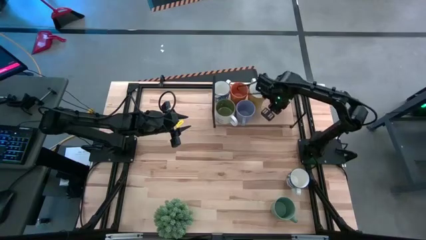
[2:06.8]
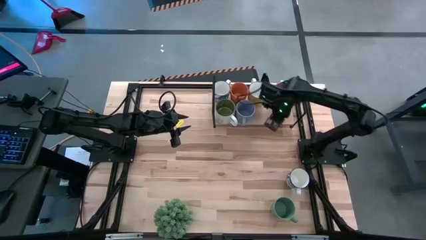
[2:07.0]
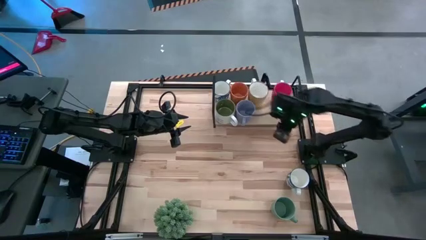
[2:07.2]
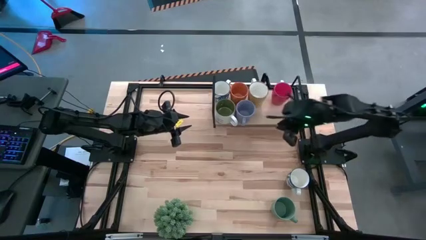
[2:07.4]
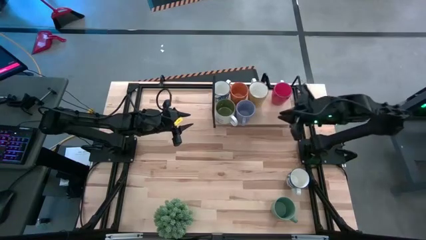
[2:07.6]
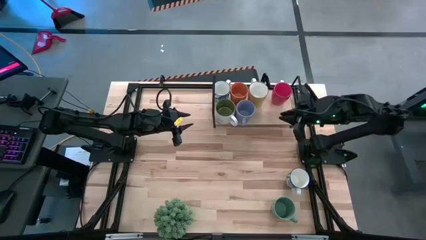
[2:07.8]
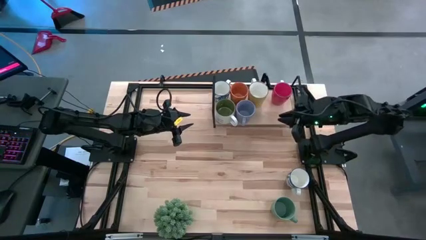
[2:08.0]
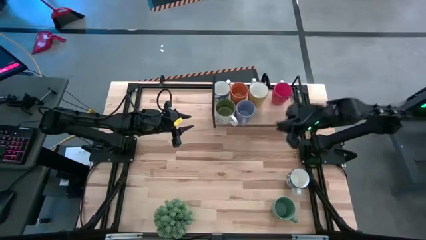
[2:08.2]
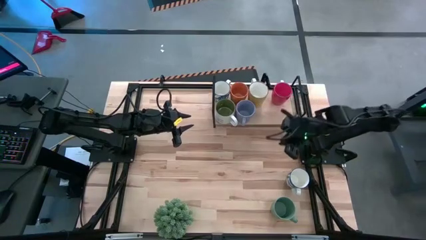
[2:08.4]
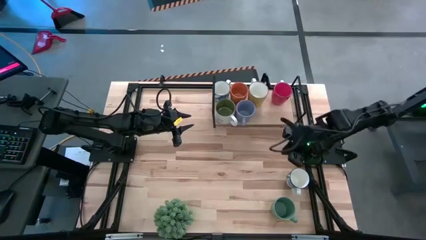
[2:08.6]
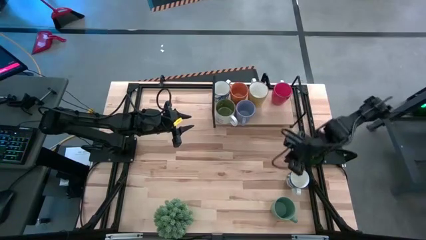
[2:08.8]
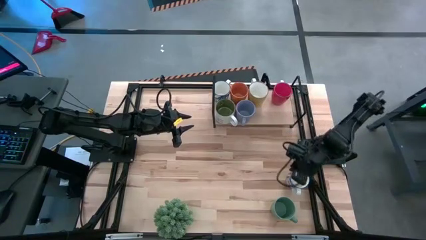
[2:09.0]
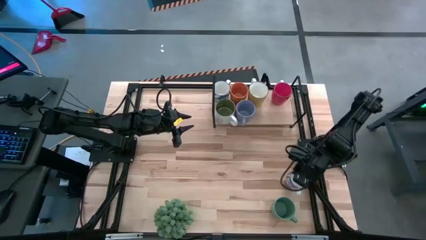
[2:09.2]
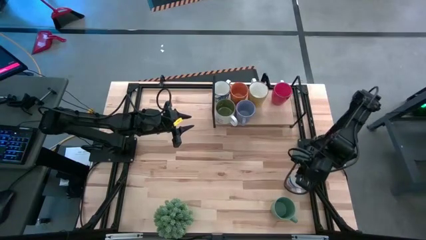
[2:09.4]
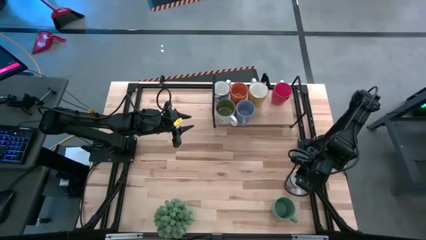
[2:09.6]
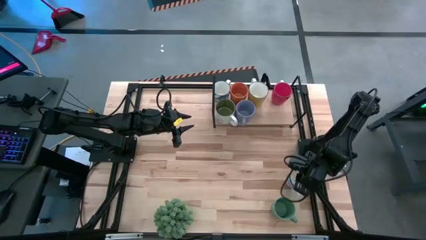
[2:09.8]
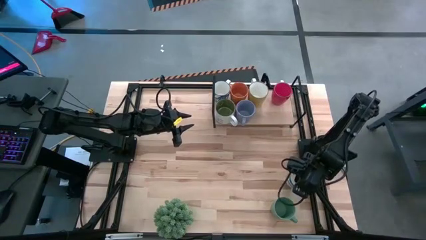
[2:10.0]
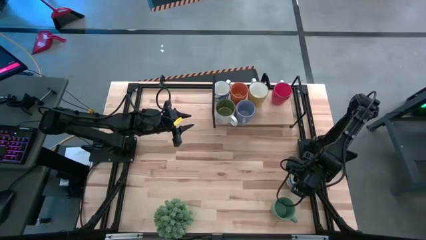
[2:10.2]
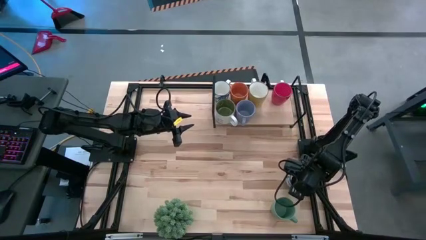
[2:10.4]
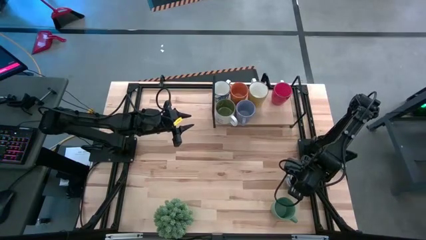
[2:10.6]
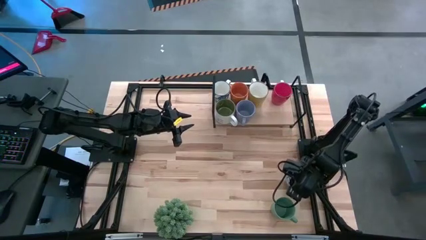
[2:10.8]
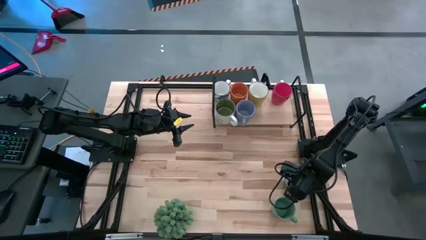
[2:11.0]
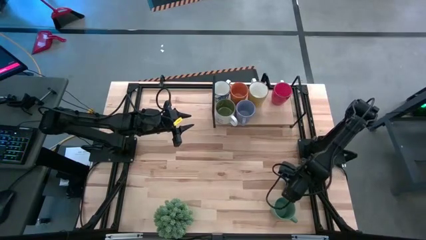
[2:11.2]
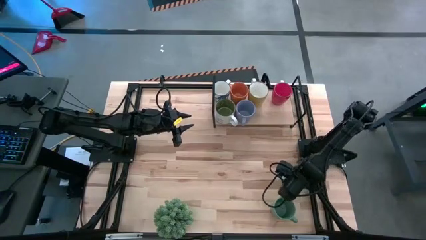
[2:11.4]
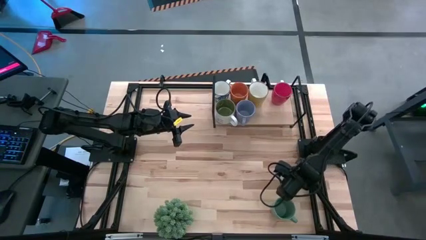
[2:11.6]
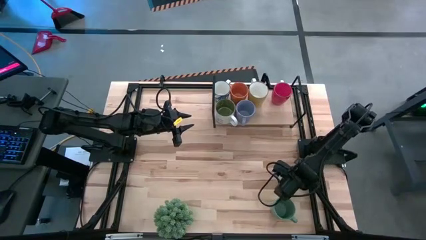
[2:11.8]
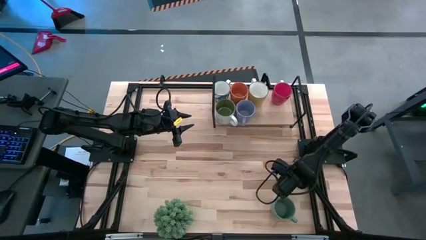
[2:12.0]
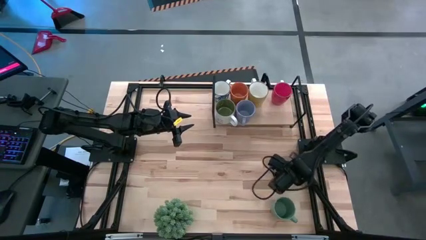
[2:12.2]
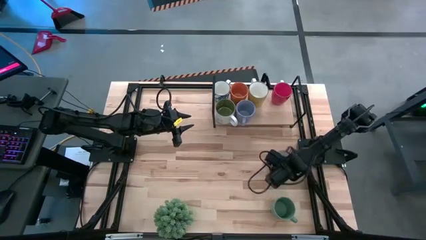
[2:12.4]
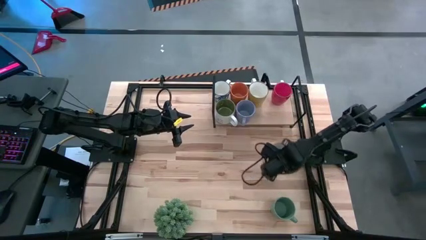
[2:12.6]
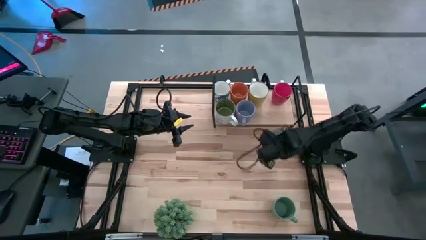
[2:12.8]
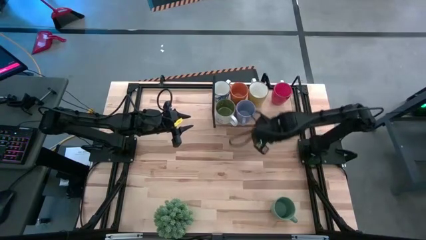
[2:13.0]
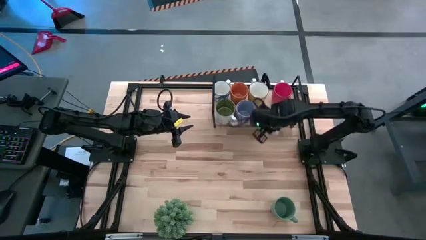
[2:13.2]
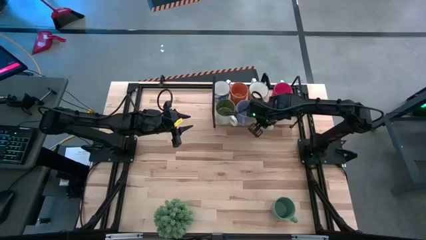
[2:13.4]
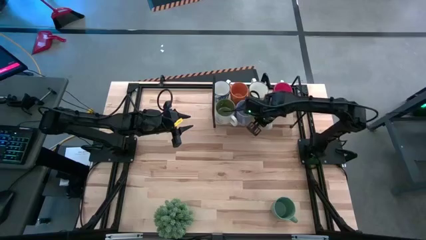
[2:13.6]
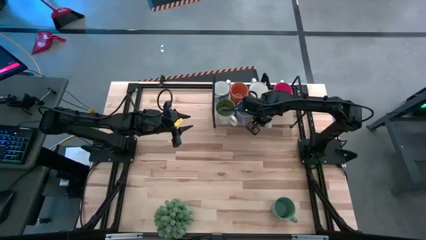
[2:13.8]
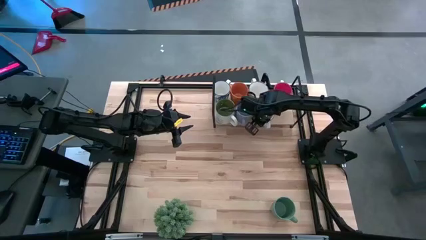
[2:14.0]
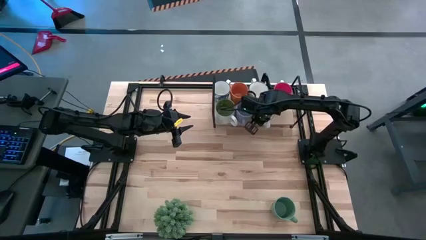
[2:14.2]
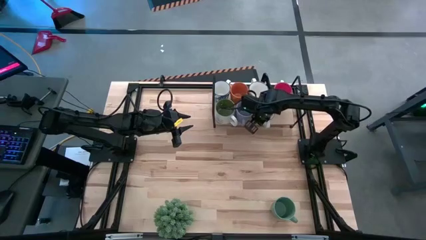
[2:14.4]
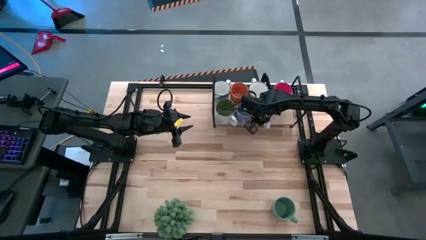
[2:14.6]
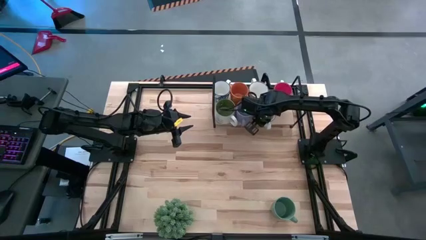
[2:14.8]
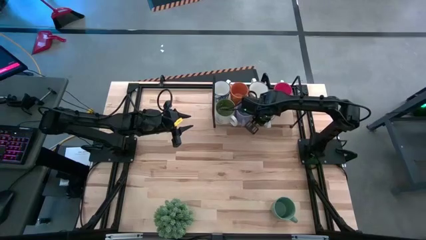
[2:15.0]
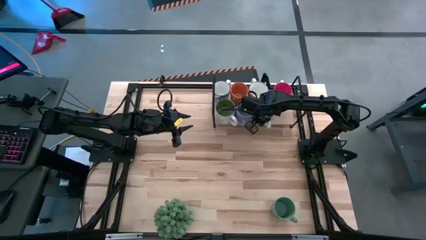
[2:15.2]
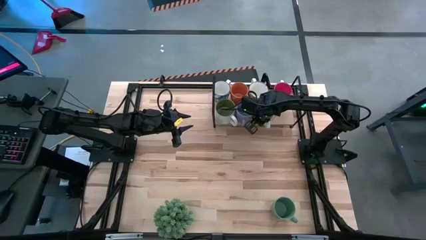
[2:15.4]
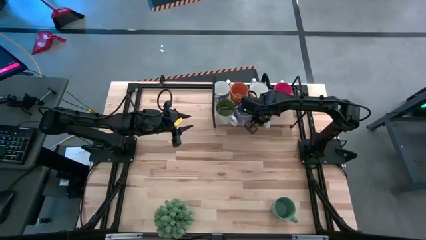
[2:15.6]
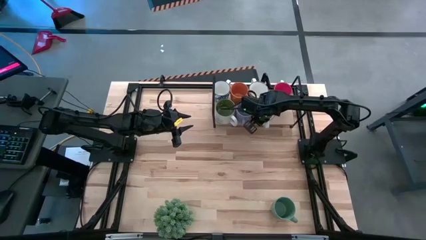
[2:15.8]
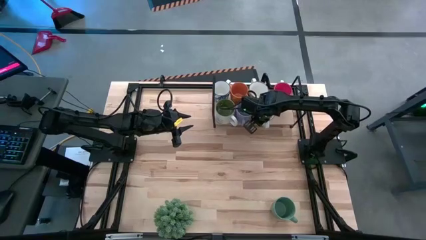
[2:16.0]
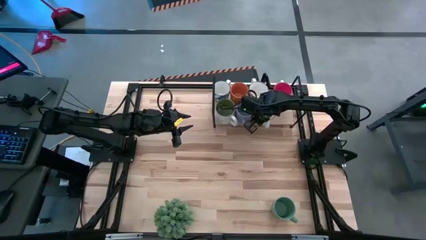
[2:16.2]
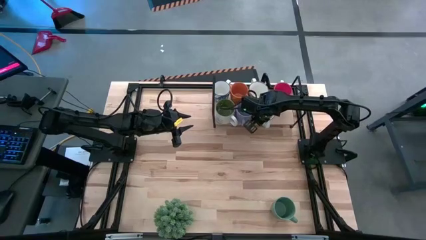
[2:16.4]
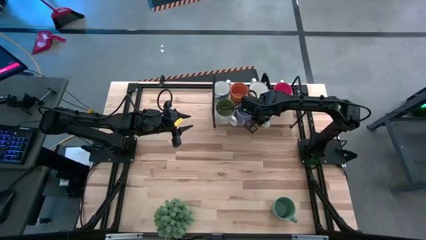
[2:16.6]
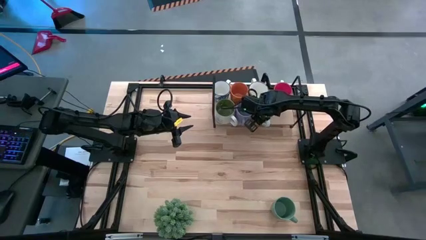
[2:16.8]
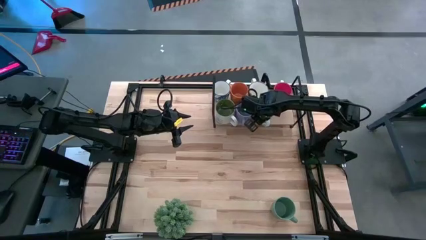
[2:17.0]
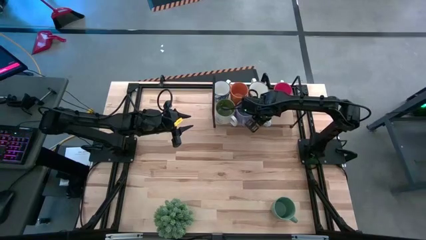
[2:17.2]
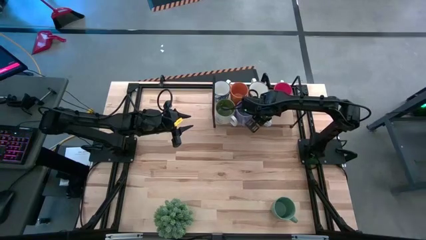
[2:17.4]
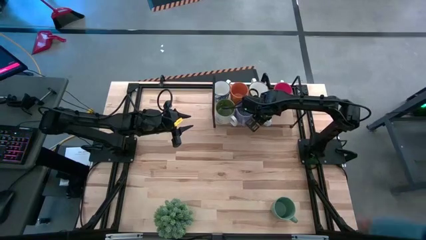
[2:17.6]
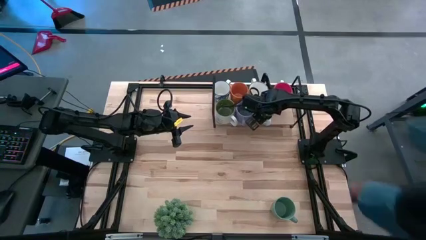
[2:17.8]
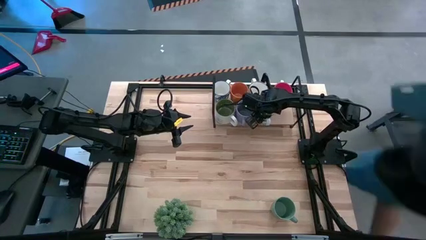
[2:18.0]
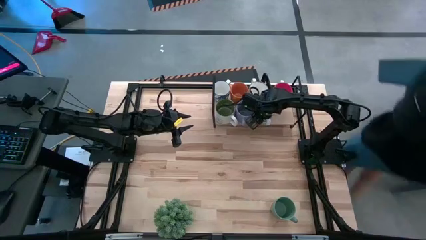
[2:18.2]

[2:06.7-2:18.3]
Task: Place coffee mugs
Put the blue patterned mug on the shelf

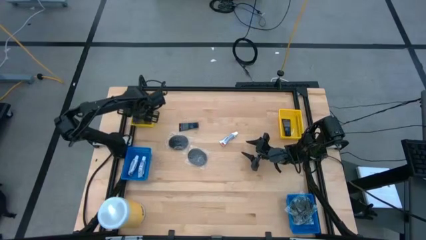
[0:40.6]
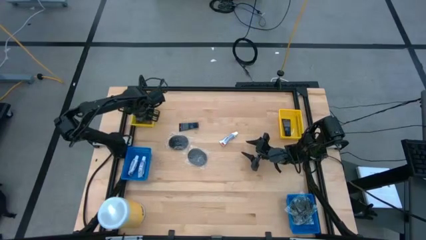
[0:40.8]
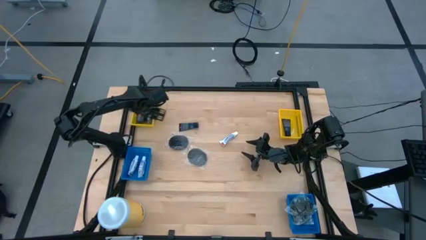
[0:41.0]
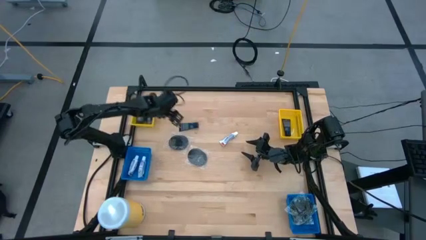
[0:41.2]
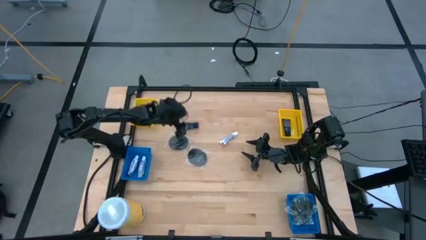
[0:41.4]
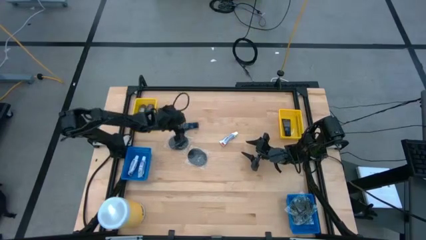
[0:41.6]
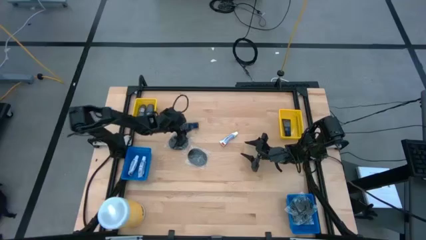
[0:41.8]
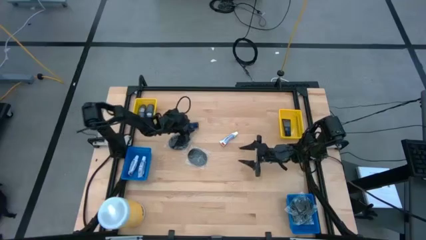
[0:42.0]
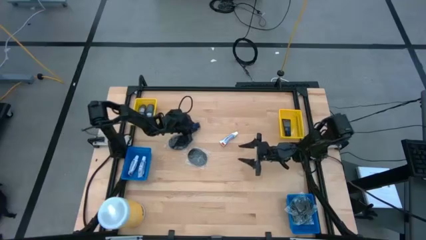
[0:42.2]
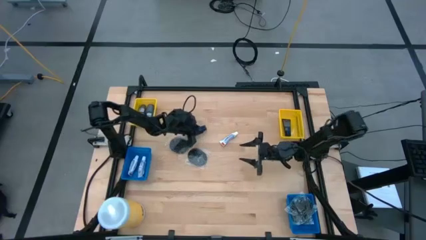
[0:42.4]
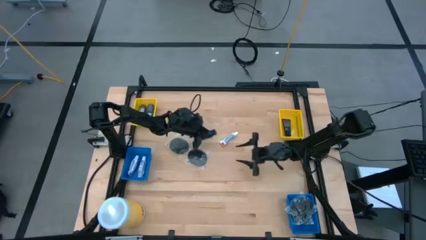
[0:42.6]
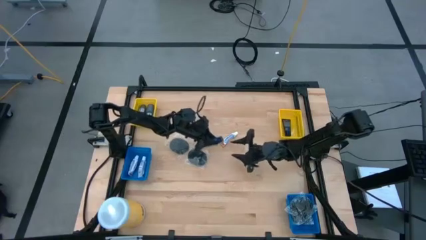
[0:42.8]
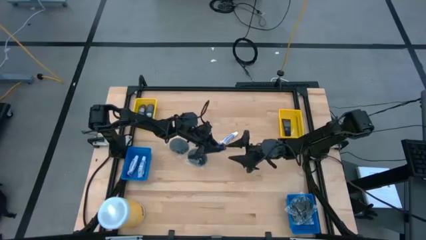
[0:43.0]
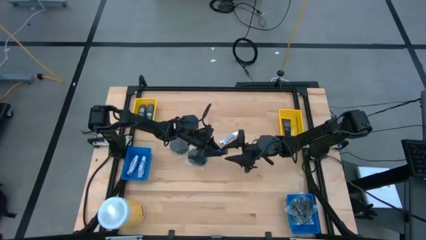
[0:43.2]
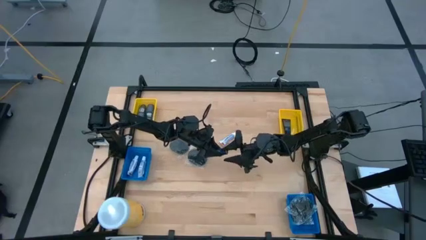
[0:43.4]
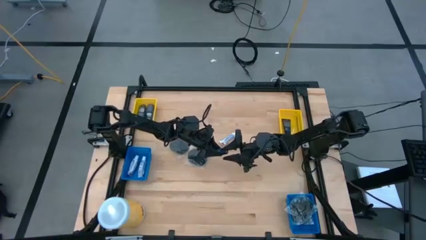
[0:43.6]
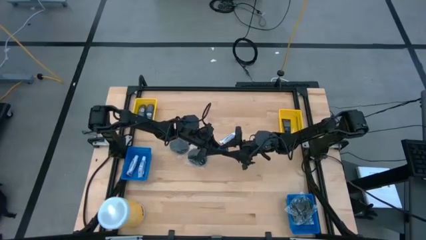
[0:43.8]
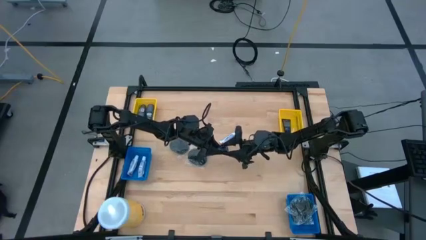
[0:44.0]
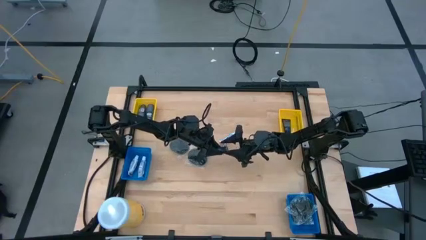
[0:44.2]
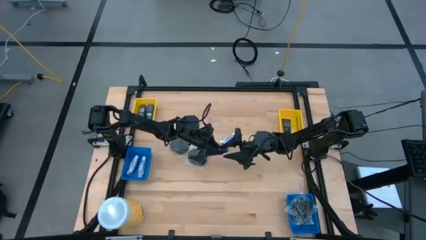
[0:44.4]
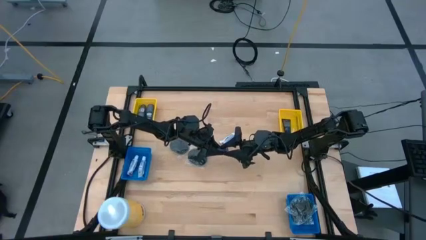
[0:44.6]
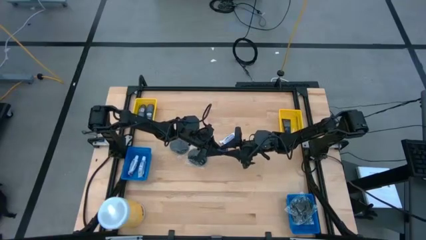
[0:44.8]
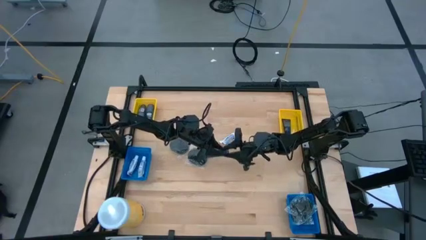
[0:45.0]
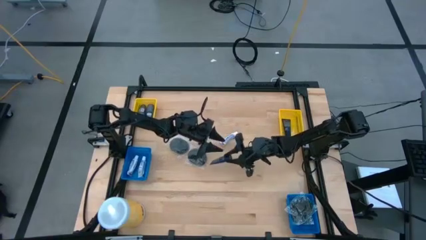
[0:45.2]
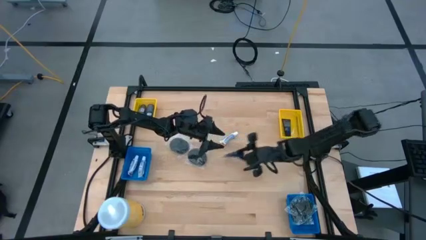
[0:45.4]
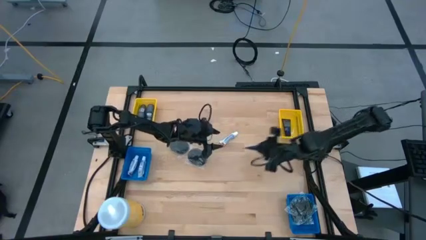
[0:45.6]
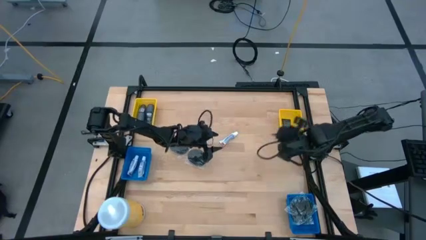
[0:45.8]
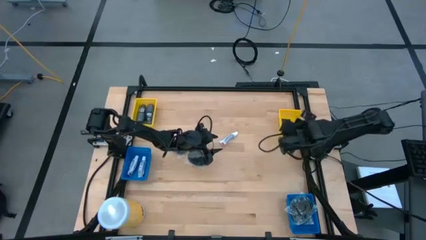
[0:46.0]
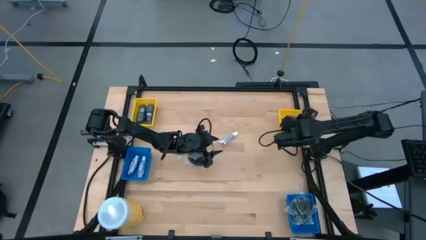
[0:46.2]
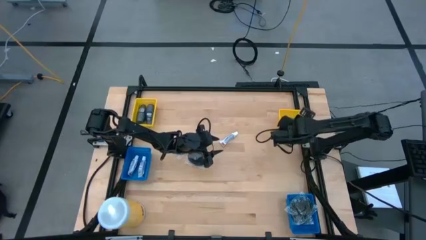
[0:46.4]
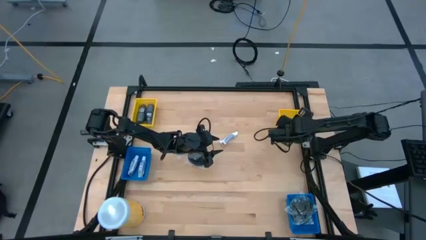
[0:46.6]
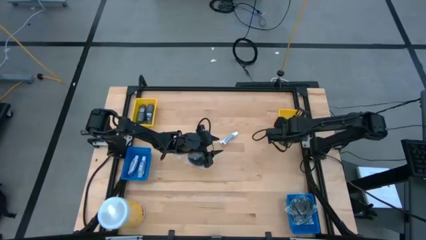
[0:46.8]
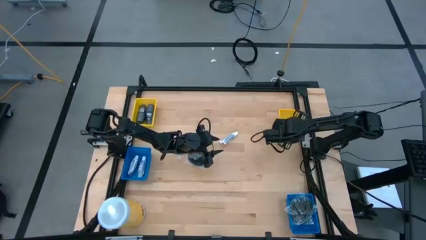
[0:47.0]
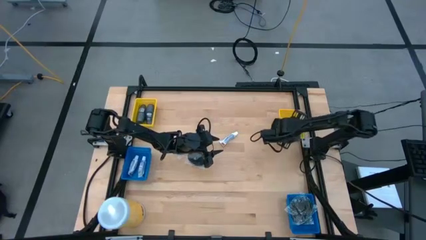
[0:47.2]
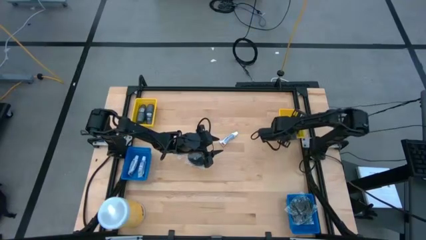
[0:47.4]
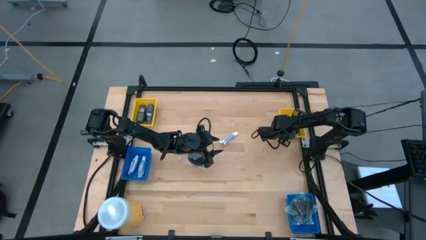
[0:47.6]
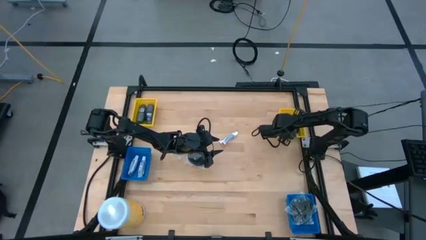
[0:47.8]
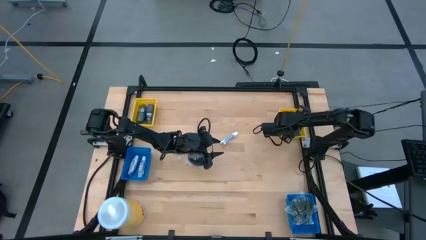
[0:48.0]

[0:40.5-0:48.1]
Task: Pick & Place Travel size toiletries
Put the blue shave cream into the right yellow basket
